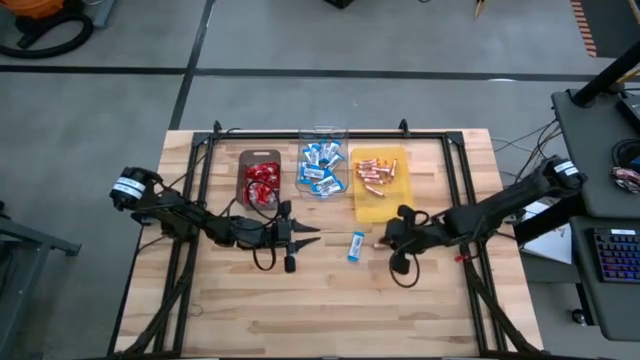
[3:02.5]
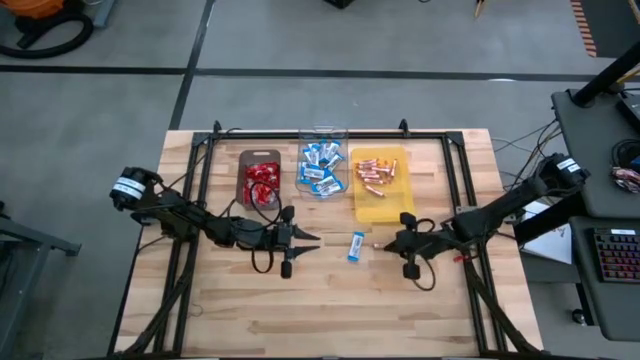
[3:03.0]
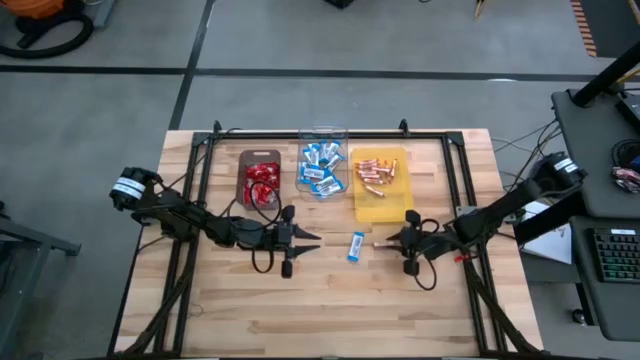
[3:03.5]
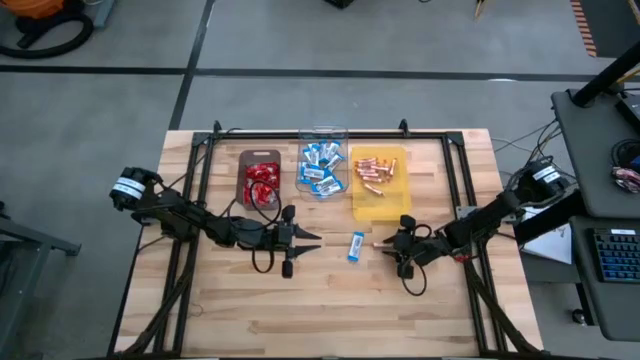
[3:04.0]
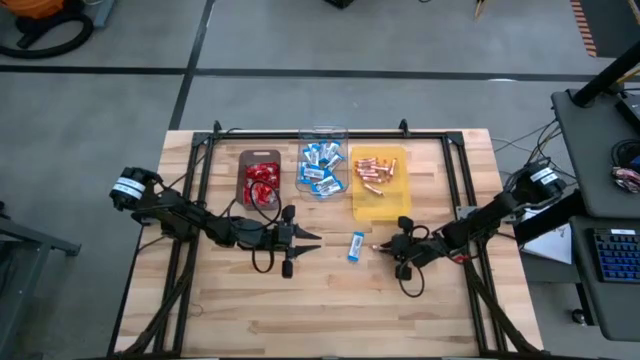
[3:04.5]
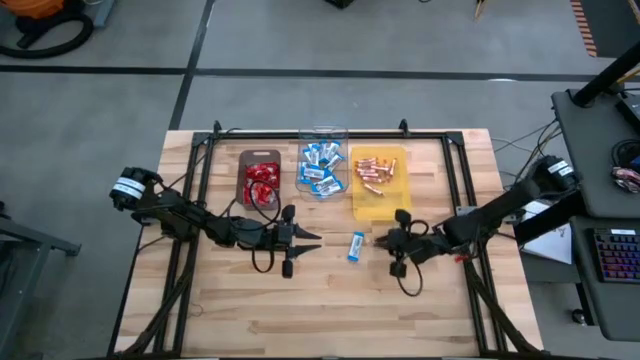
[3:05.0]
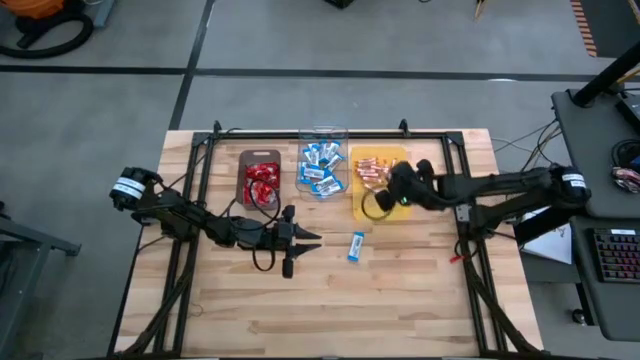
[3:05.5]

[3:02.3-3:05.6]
Task: Sort candy
Put the white-red candy into the yellow bin

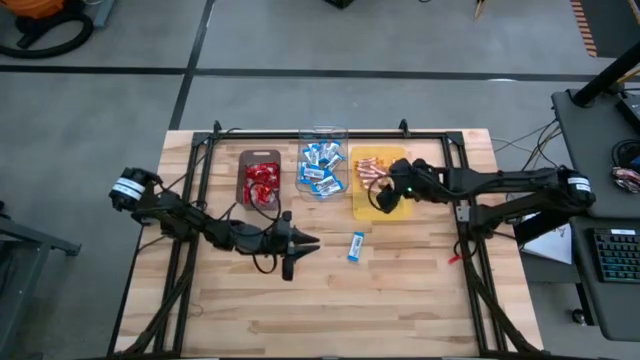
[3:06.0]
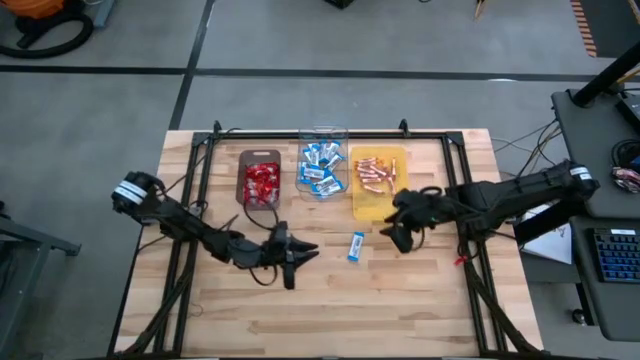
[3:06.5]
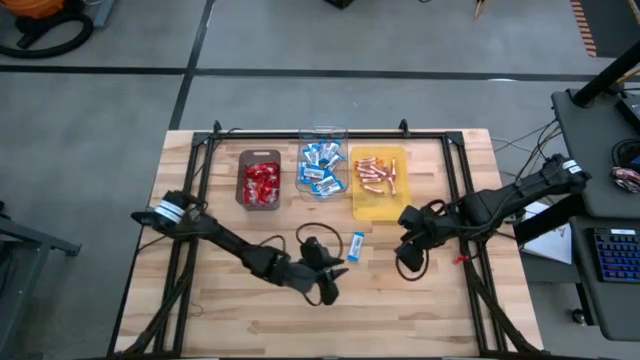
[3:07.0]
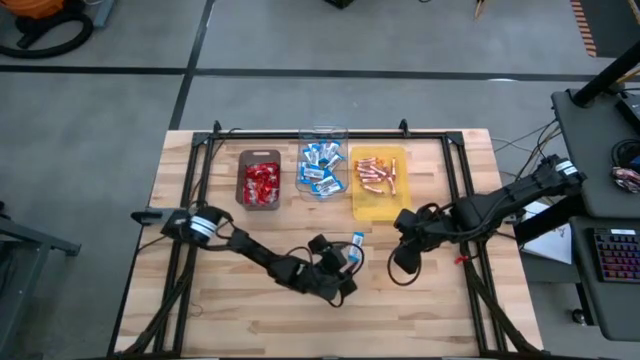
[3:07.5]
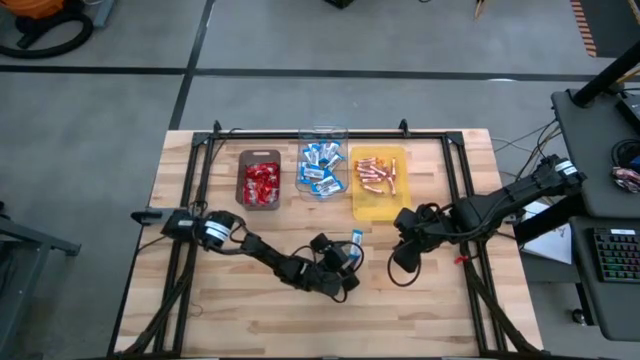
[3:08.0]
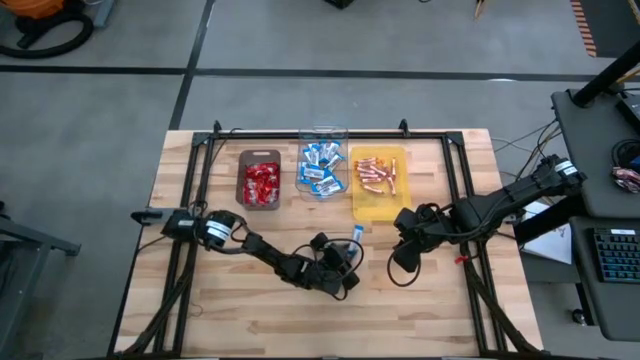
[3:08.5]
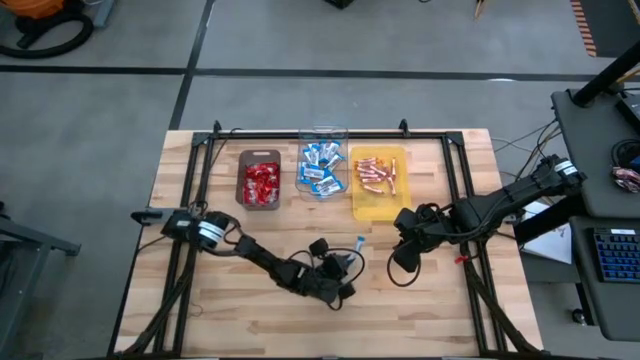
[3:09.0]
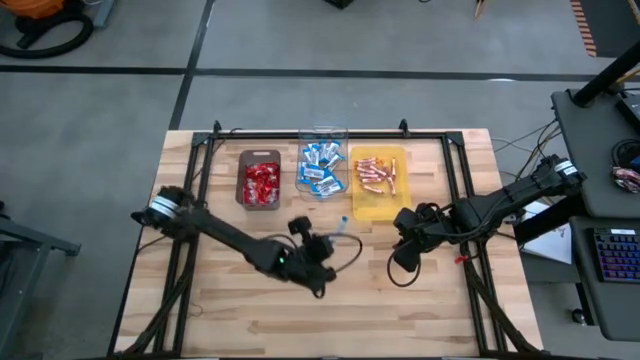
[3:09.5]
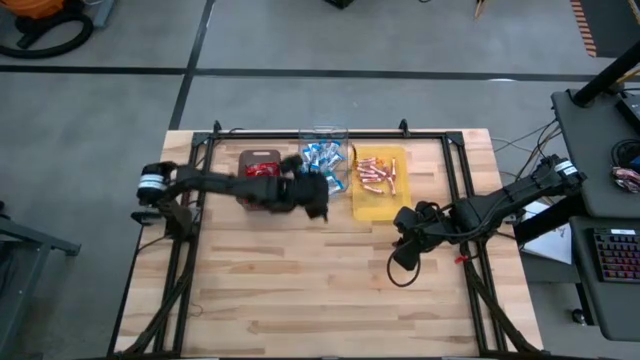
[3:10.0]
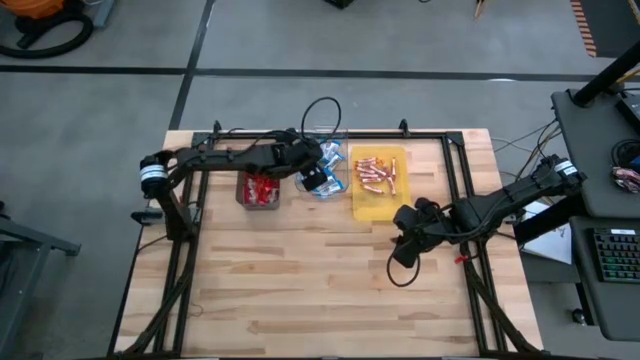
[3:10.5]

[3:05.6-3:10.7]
Put the white chocolate into the transparent bin

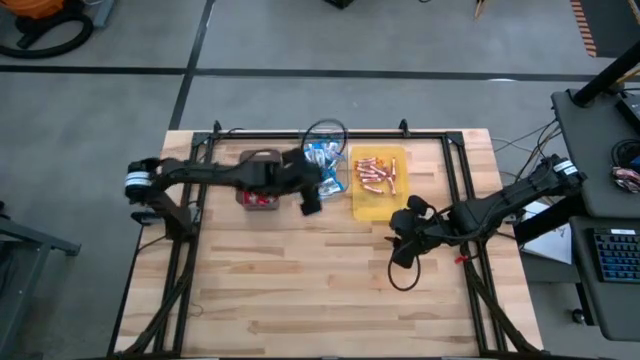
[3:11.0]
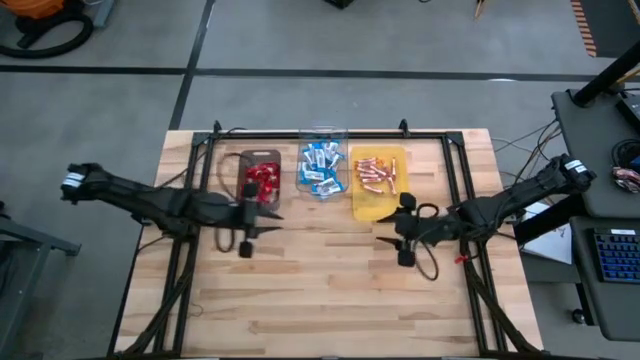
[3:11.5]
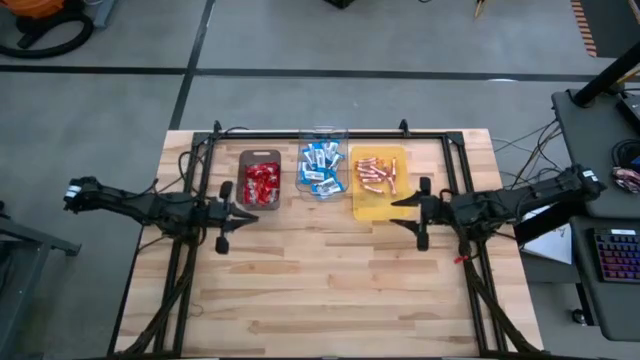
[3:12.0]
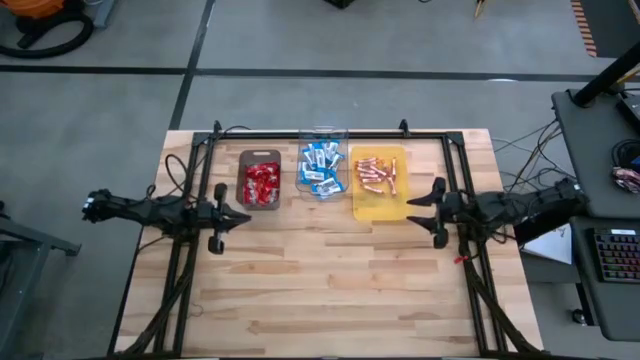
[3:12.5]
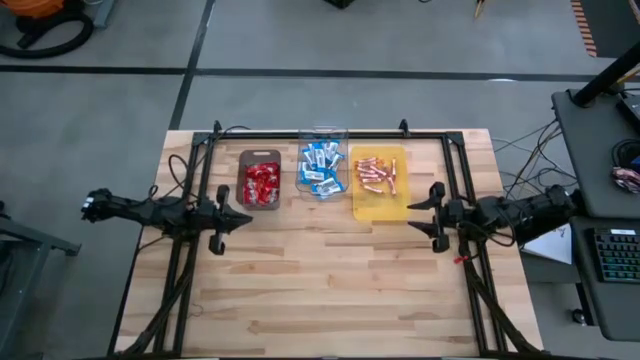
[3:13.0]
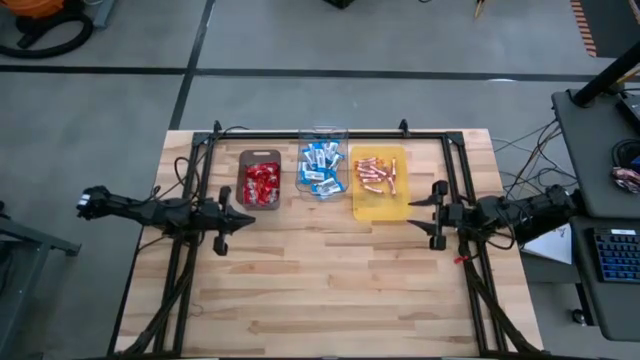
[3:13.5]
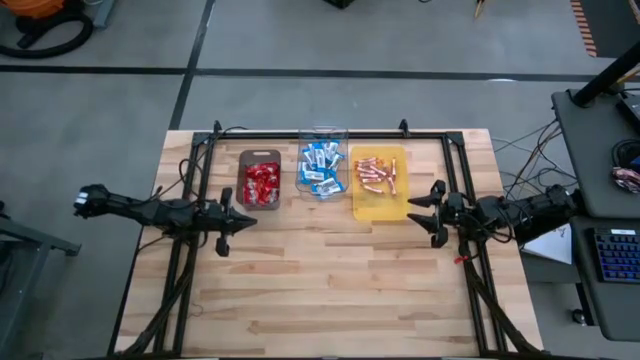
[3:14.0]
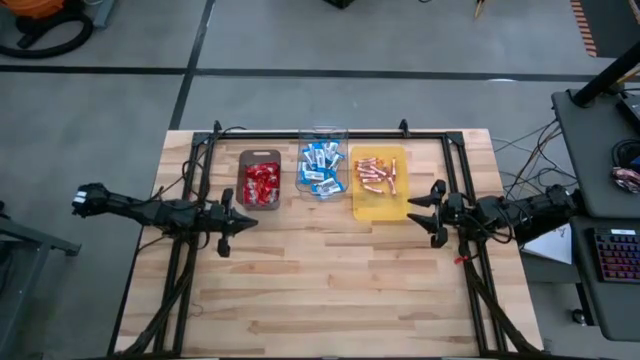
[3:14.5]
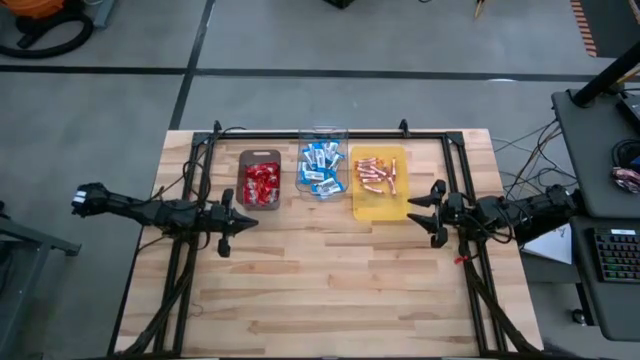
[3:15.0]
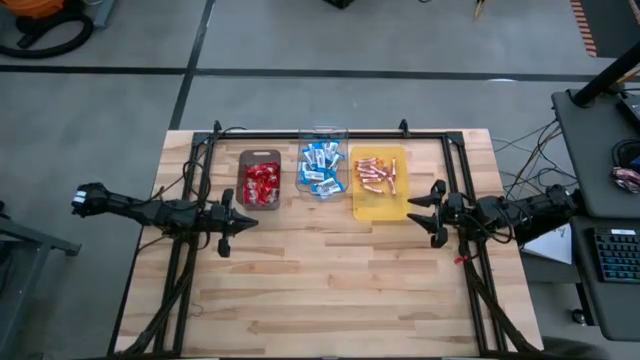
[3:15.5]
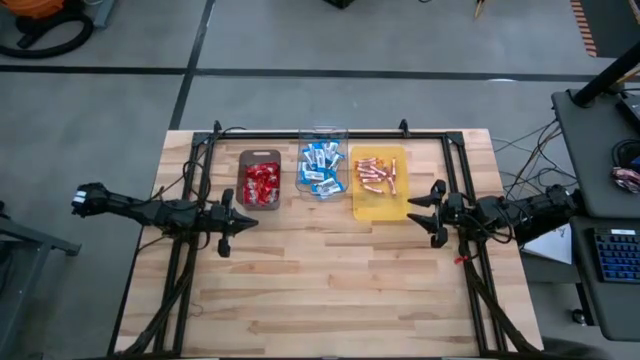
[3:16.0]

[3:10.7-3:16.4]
Return to Home Position

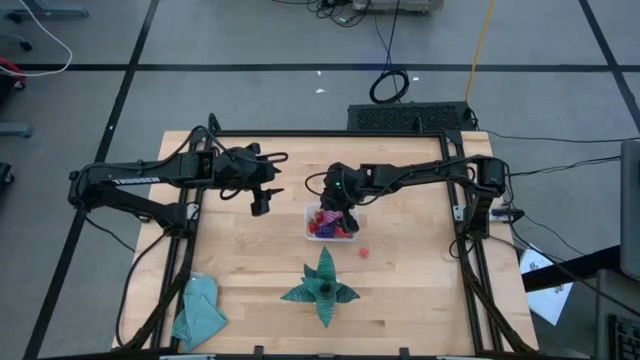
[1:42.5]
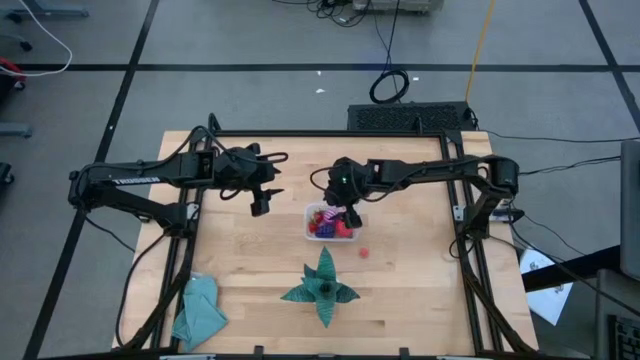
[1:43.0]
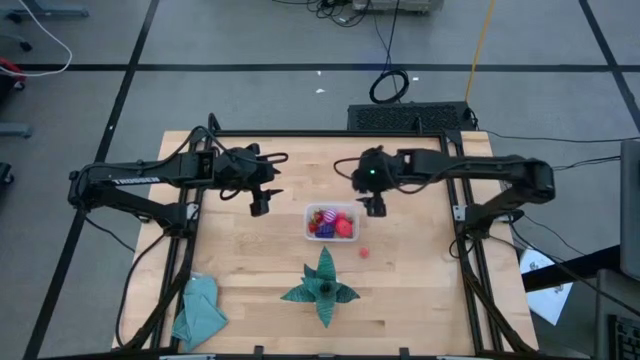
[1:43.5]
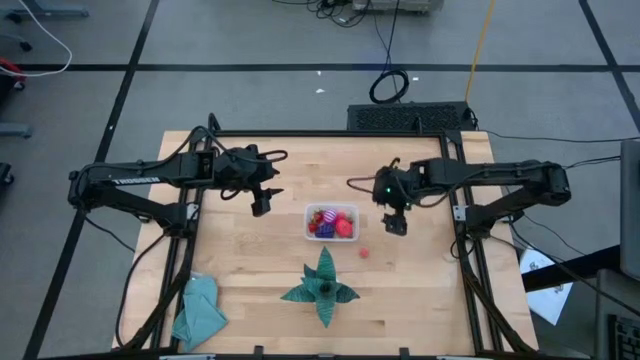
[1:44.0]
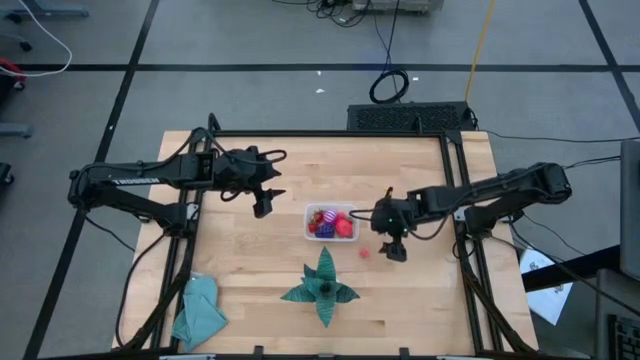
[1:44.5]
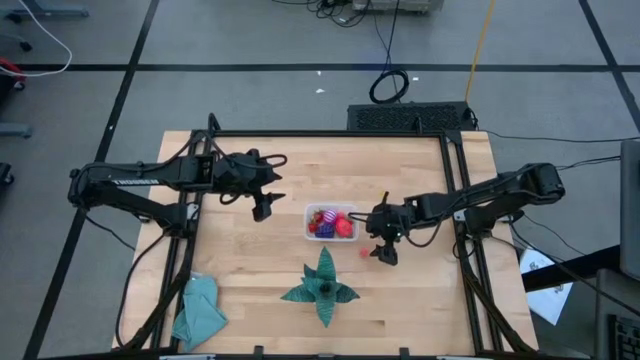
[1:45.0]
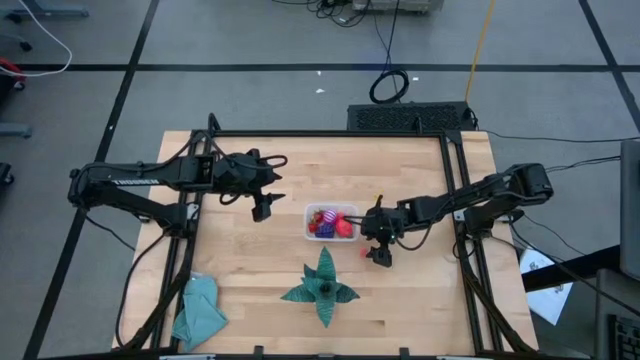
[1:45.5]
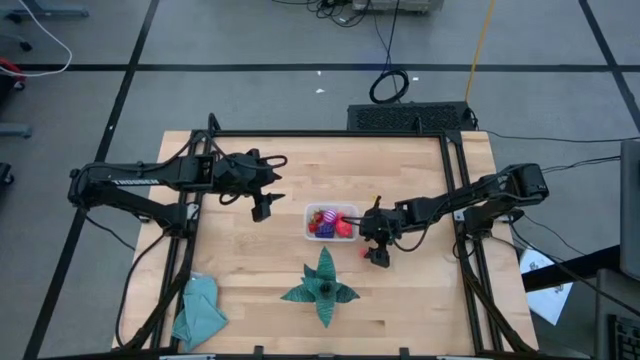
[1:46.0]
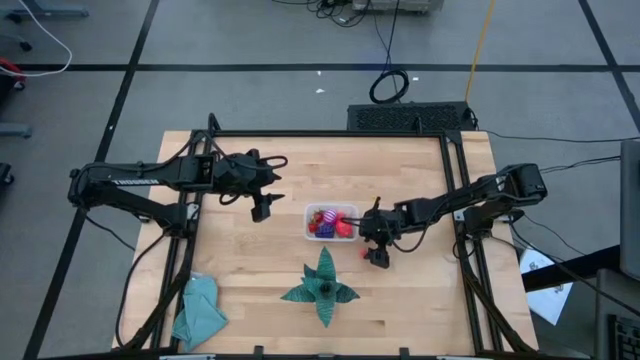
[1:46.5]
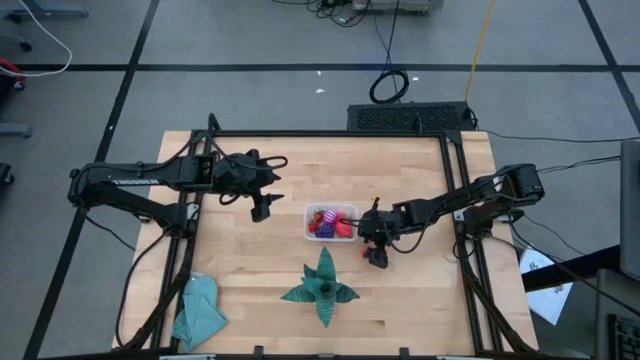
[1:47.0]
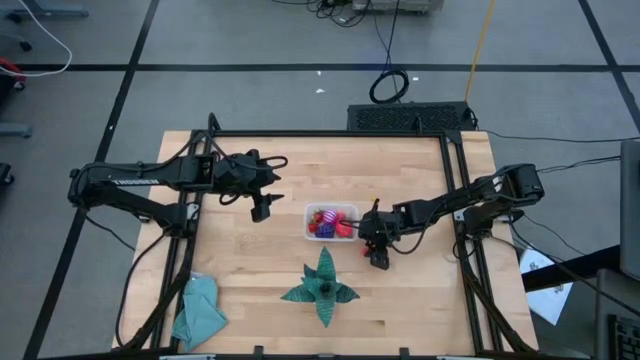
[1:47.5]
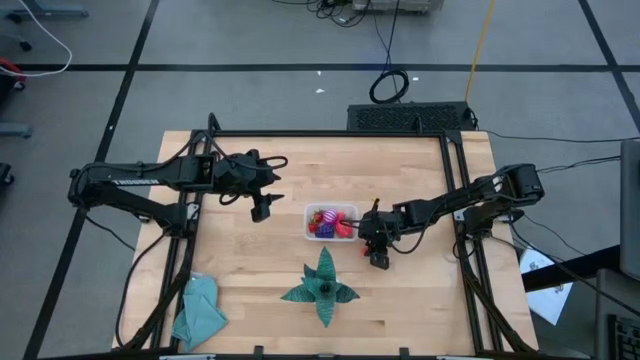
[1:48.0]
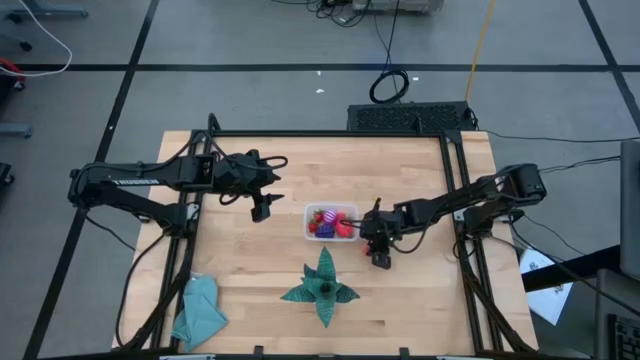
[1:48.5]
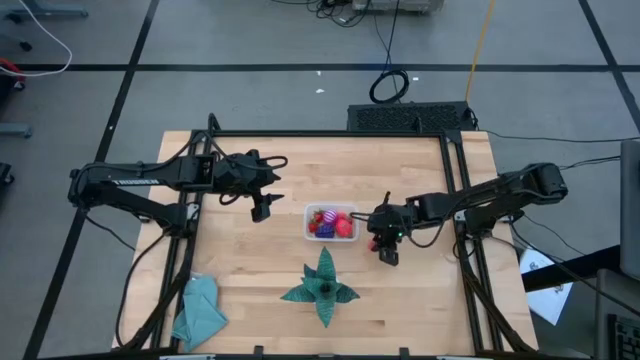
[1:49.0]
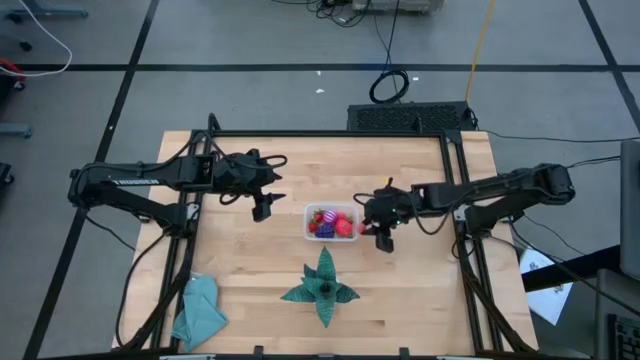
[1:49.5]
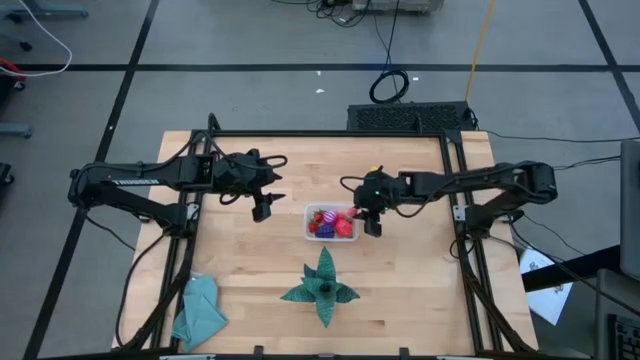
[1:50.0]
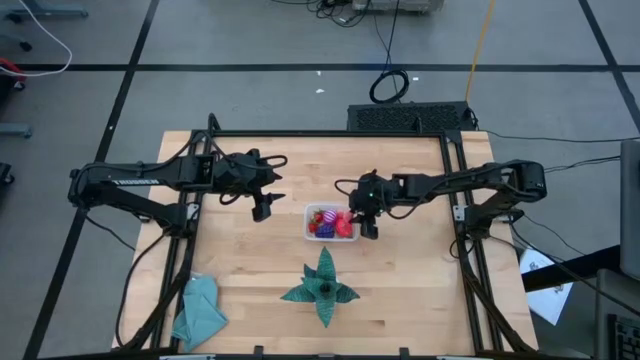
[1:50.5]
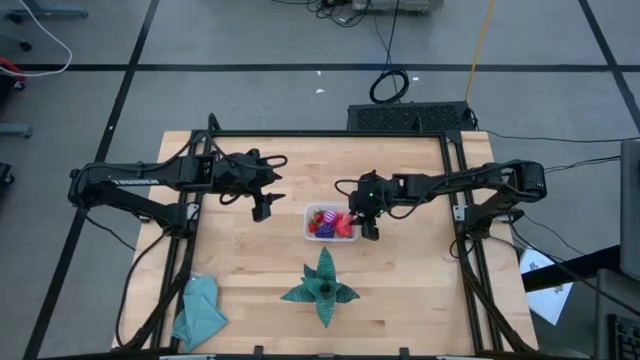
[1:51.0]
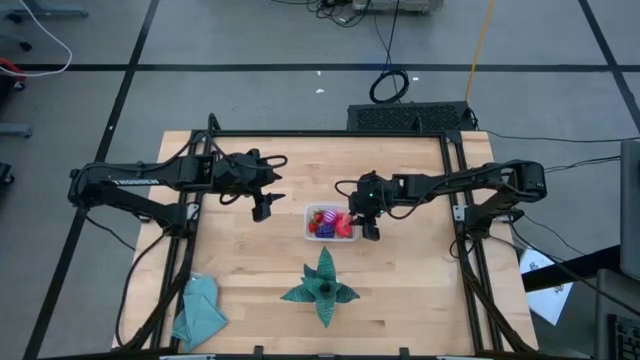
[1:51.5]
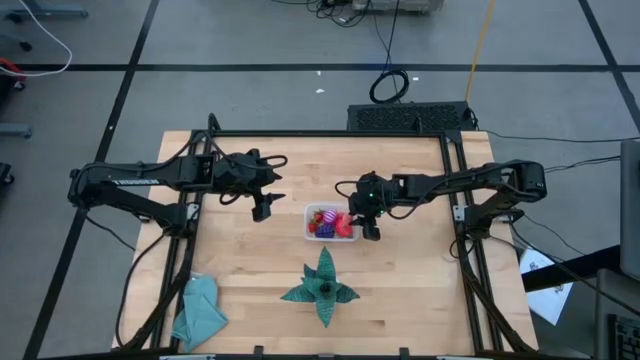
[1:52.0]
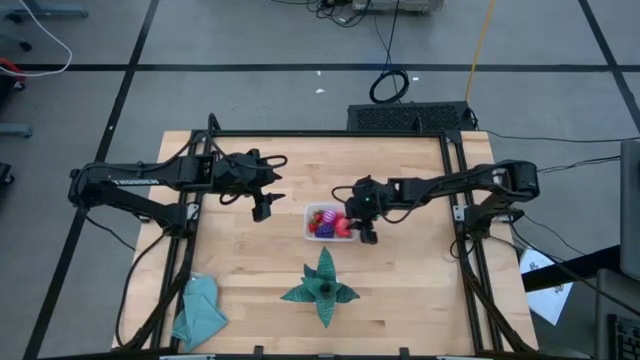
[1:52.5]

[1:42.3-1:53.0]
Task: Pick and placing Produce into tupperware
Put the pink peach into the transparent bin
